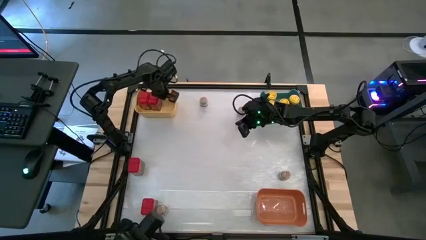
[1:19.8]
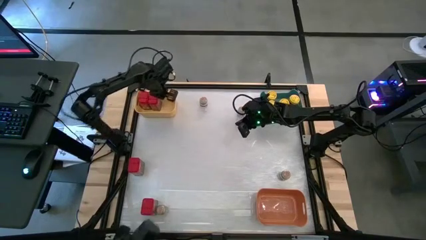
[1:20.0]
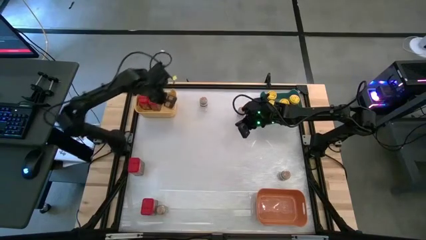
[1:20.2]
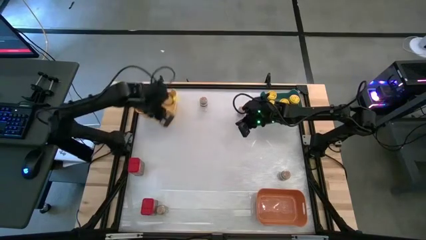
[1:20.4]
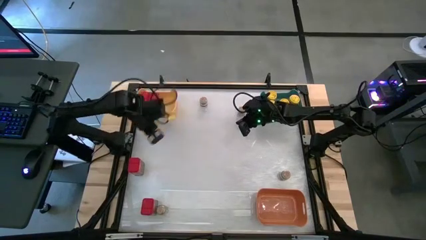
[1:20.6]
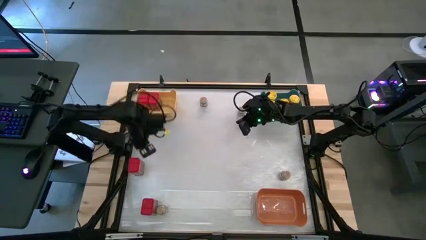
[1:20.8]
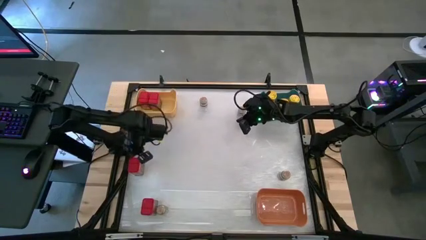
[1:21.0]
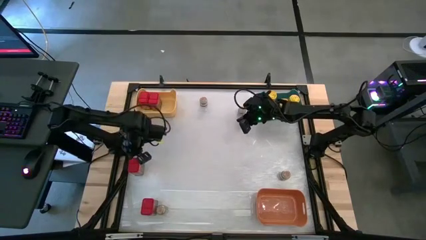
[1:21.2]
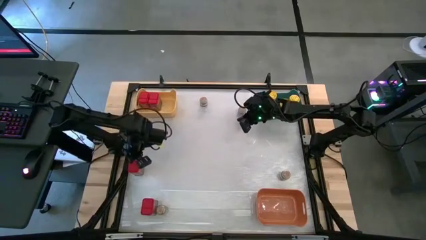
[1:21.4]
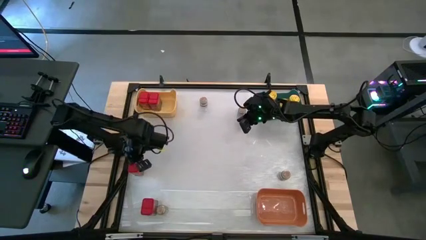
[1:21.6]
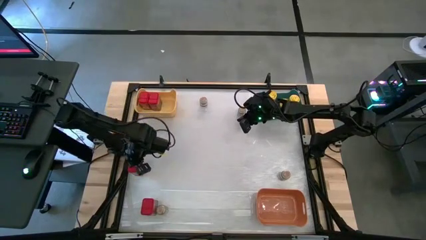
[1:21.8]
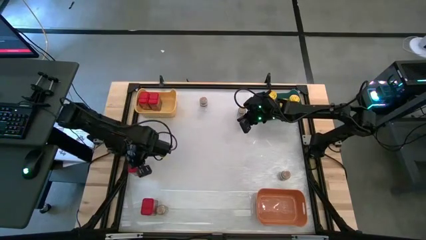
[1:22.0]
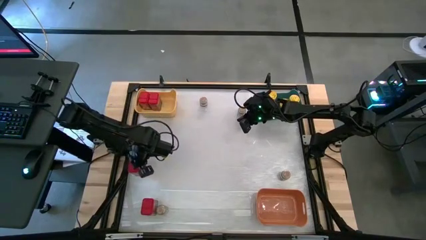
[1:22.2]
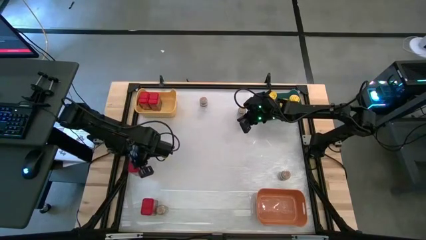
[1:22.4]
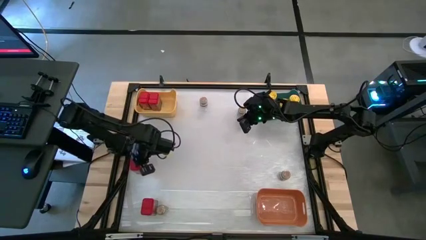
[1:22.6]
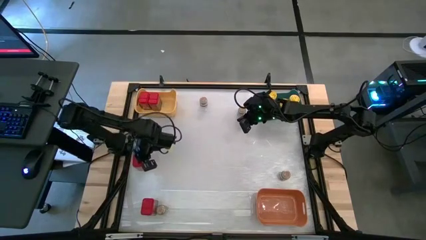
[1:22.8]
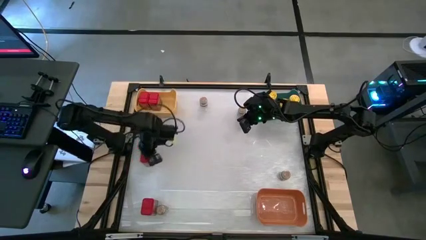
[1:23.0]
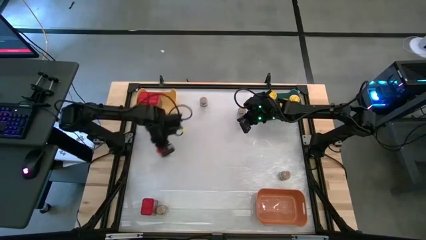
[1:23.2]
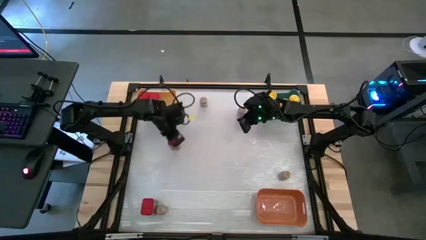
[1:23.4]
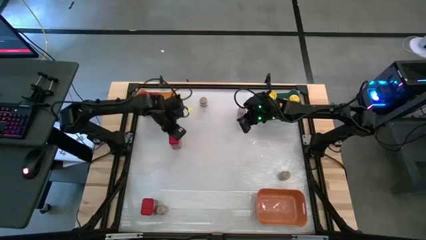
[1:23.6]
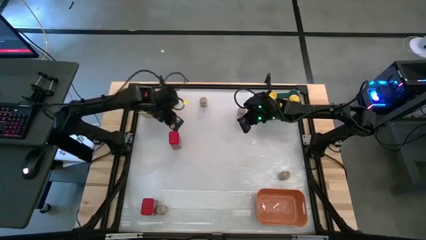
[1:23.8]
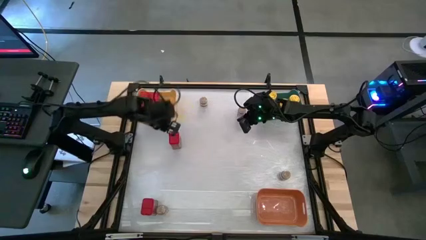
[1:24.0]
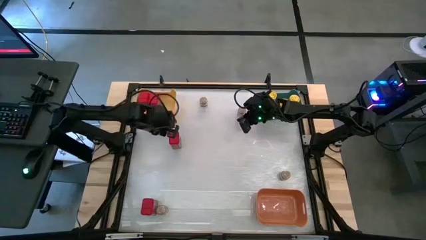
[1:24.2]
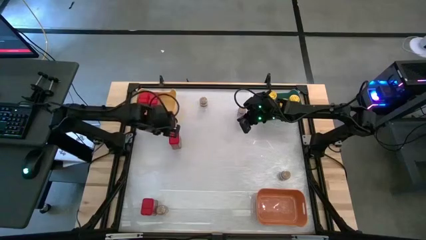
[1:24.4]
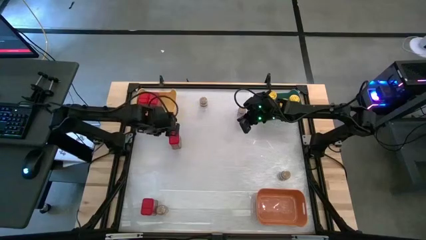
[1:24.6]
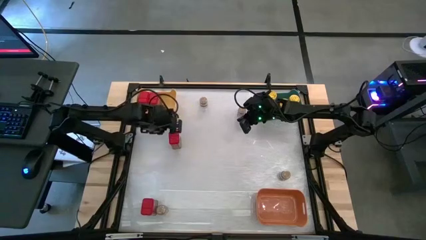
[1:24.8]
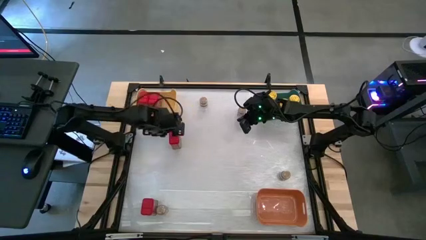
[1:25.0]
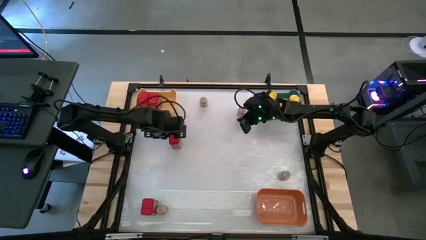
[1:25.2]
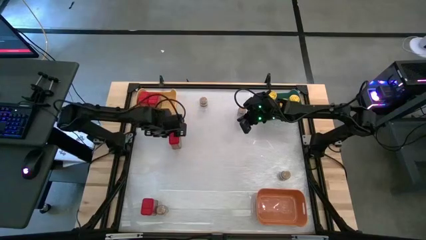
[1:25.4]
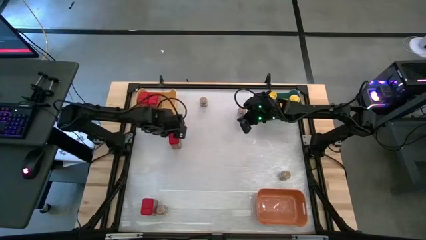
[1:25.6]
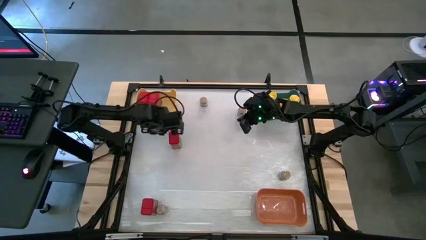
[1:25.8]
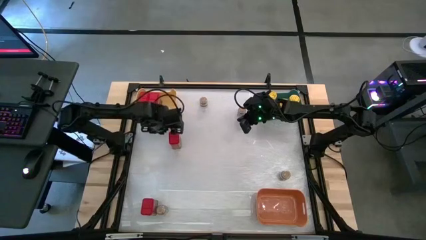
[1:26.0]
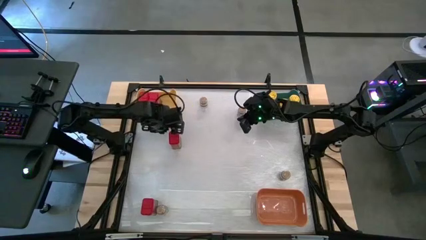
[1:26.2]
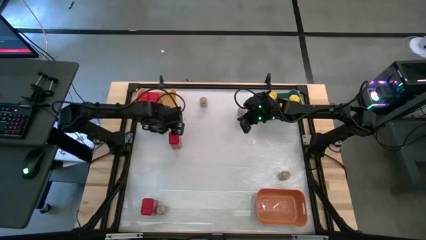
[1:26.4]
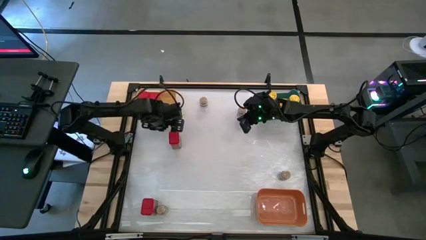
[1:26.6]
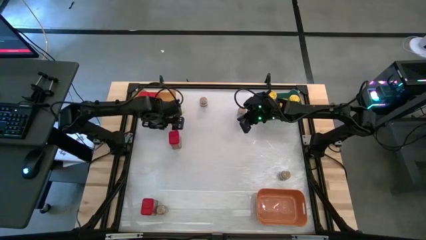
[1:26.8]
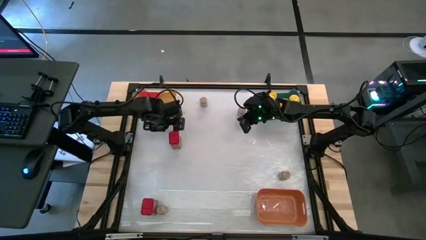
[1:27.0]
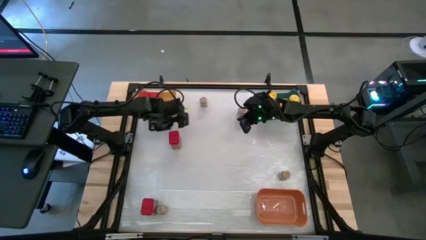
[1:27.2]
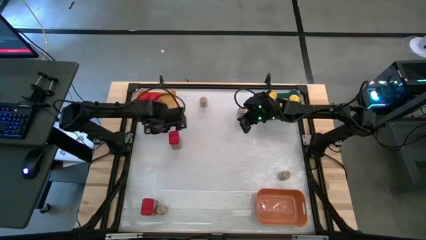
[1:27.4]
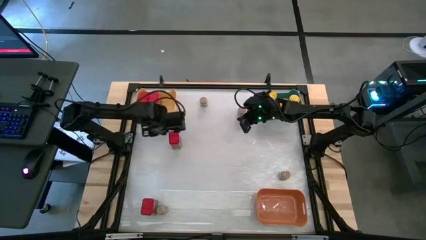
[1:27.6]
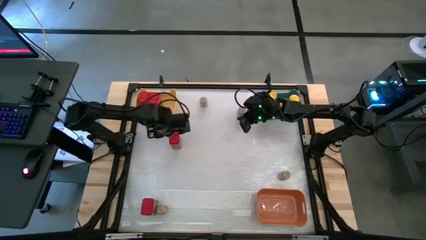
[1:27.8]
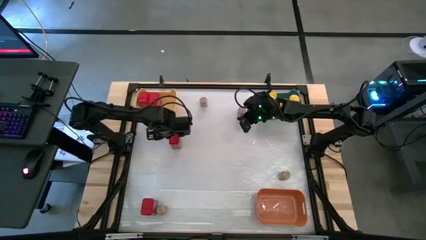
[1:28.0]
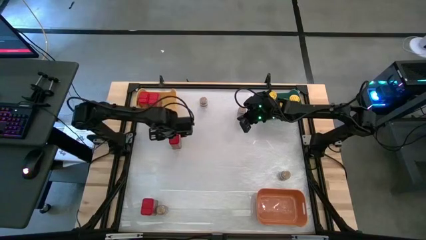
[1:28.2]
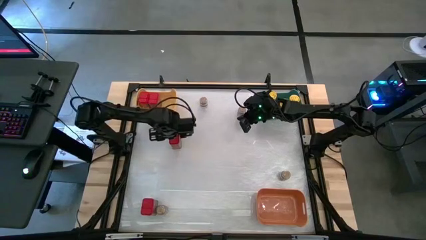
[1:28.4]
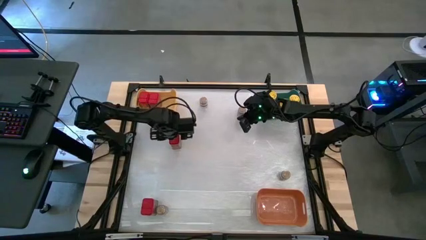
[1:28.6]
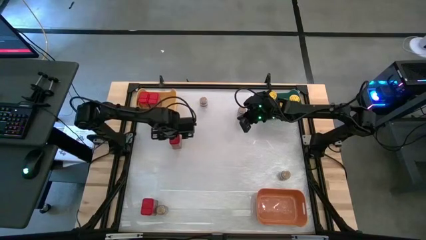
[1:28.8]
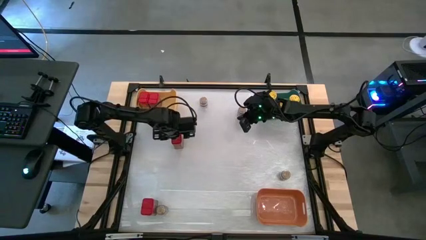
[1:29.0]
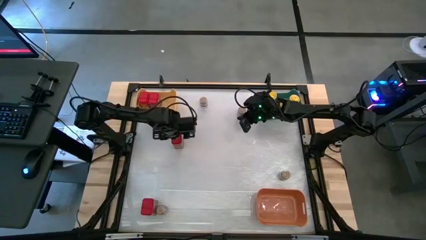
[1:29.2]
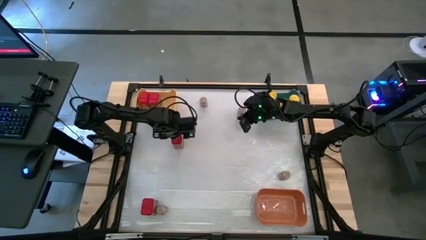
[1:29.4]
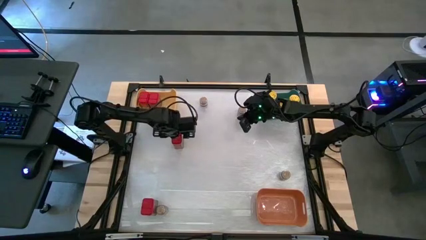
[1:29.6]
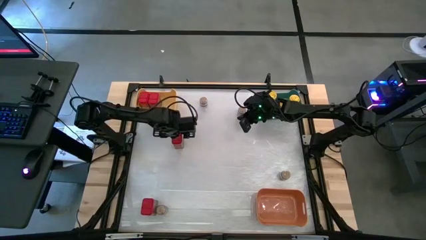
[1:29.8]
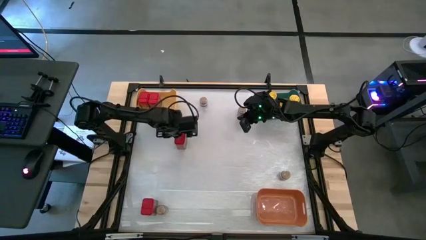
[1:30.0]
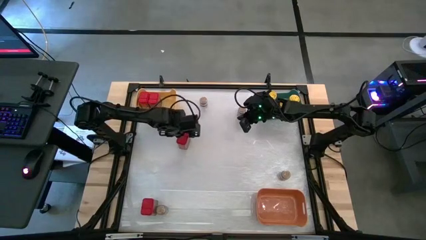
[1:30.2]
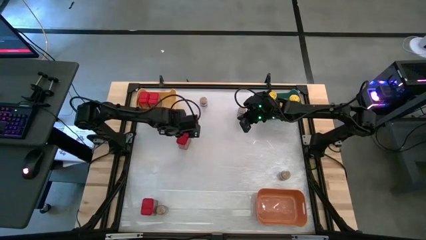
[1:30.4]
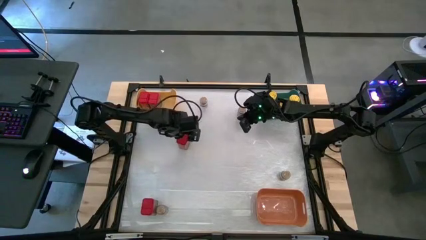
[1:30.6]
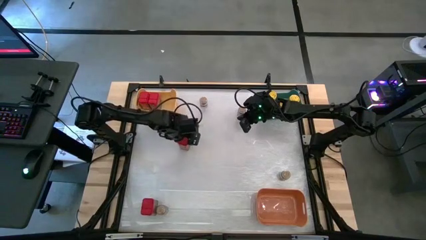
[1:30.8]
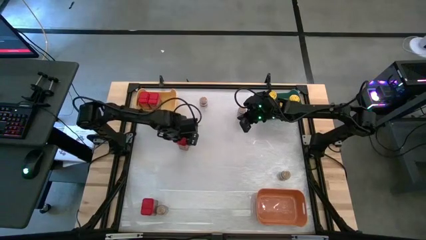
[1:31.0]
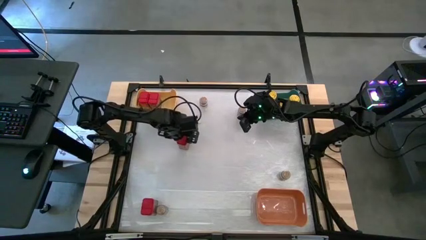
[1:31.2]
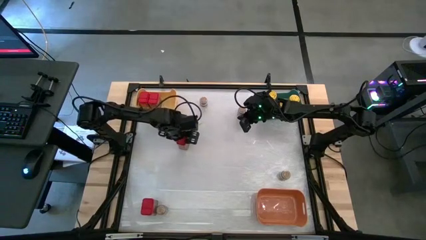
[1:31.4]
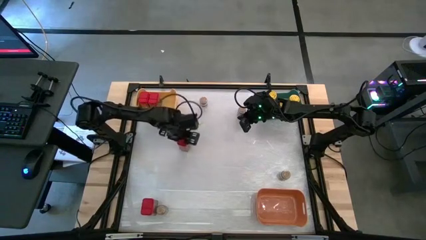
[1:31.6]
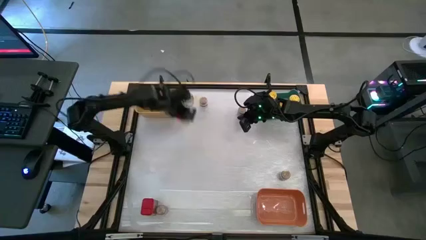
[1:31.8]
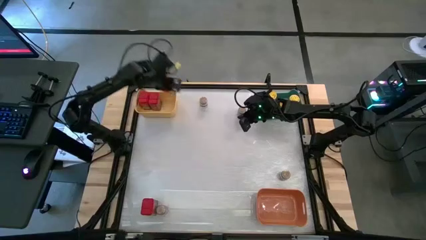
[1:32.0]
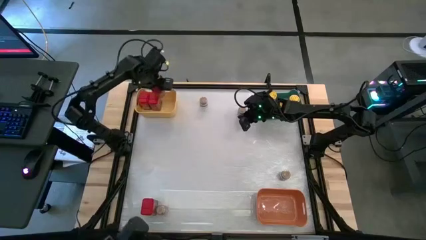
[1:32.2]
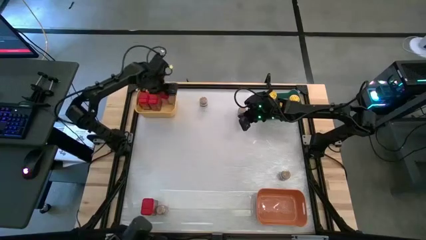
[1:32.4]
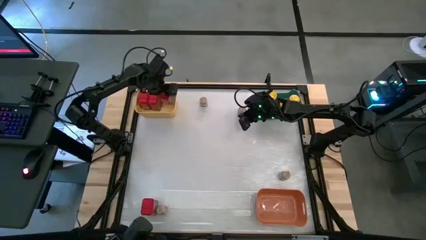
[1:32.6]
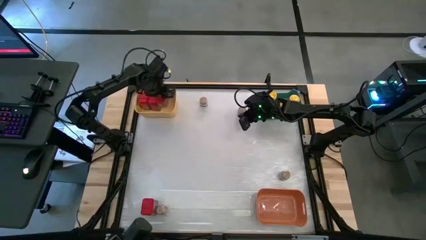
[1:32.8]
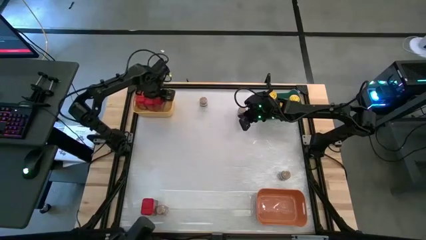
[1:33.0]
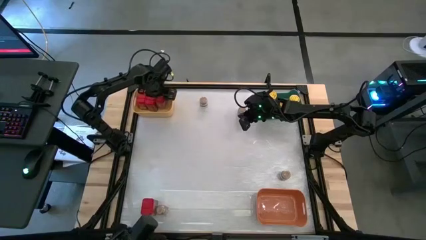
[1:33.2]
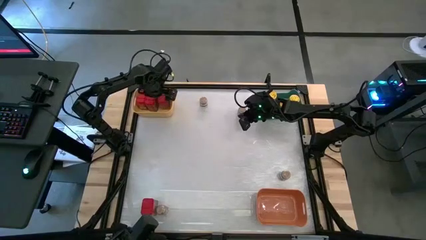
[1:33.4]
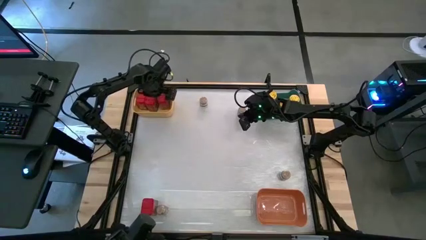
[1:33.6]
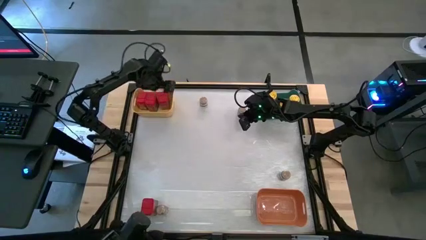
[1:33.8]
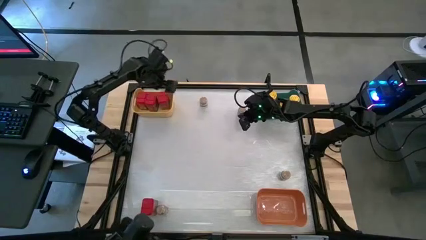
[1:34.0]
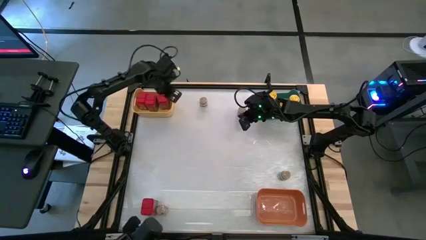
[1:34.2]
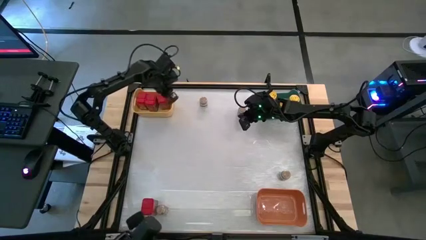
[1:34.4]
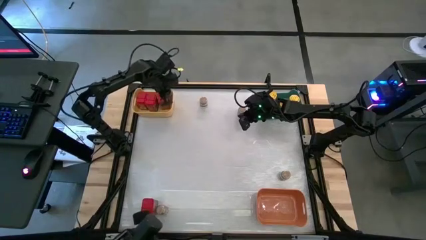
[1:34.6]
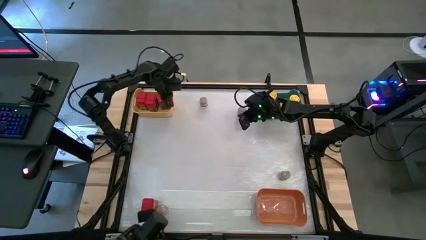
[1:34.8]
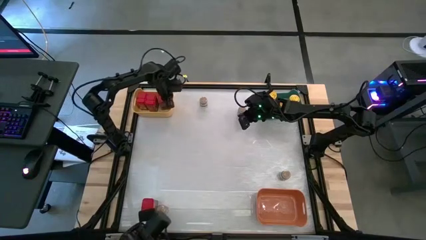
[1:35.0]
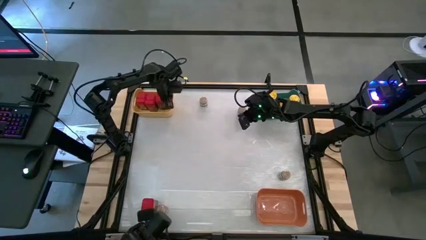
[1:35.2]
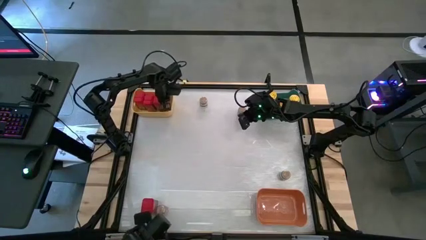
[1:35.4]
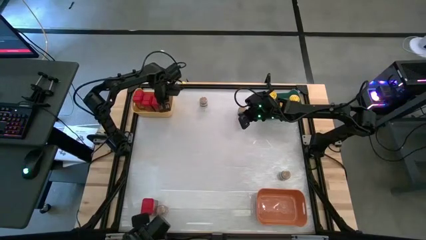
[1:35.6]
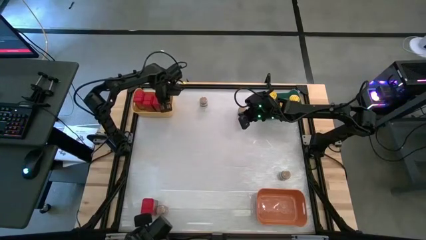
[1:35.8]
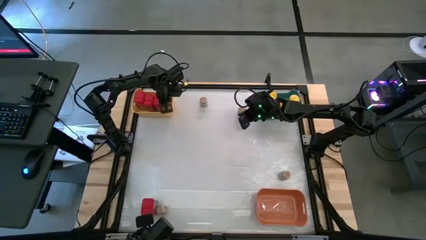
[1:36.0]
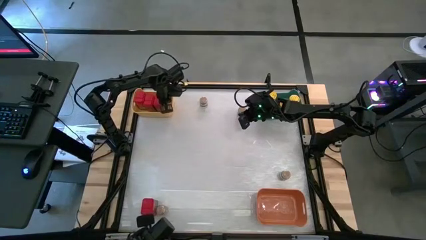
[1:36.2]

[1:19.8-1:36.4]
Task: Sort spices by type
Put the top red seasoning can into the yellow bin

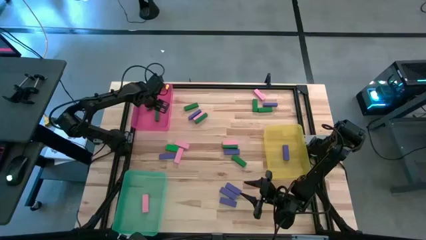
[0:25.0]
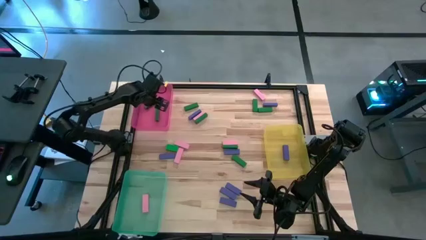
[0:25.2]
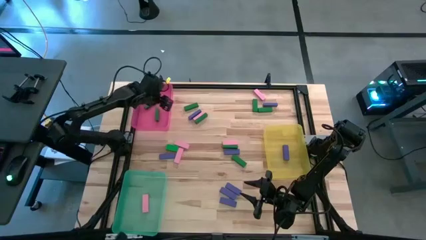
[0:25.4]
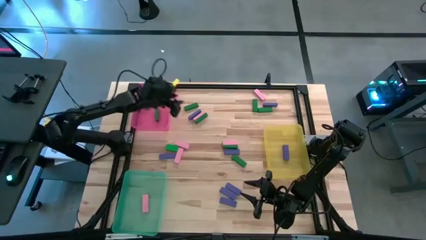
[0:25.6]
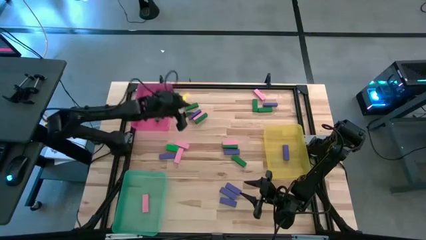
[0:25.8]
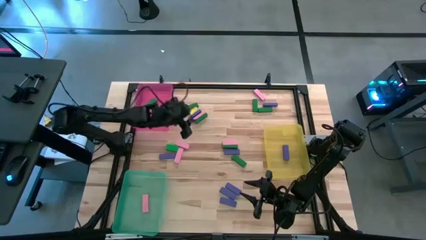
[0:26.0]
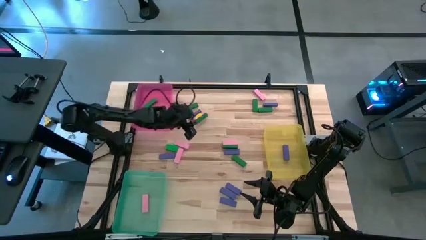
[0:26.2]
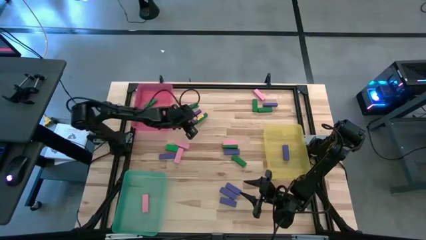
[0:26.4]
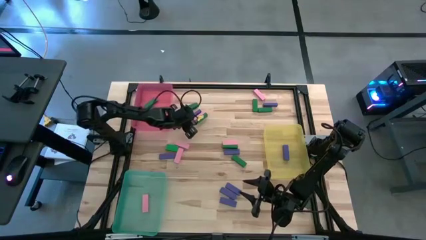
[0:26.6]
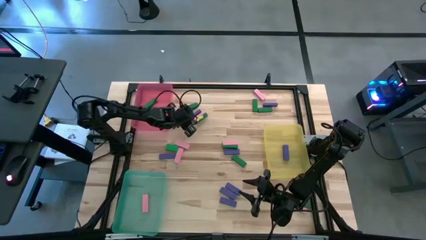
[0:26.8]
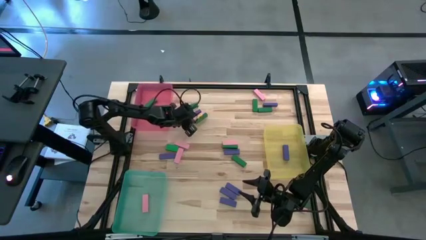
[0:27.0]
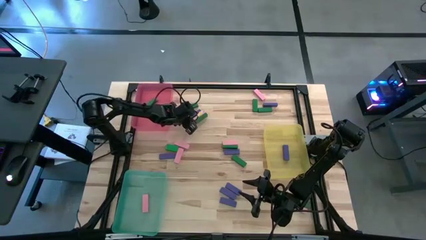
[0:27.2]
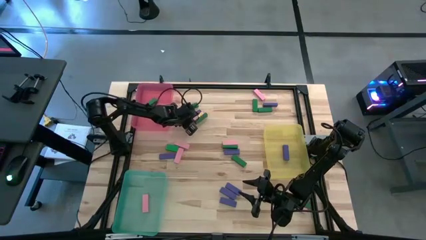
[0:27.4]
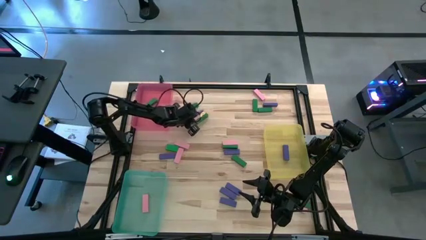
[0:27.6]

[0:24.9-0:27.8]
Task: Sort blocks
Put the blue block into the yellow bin
